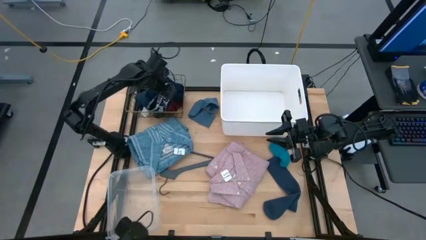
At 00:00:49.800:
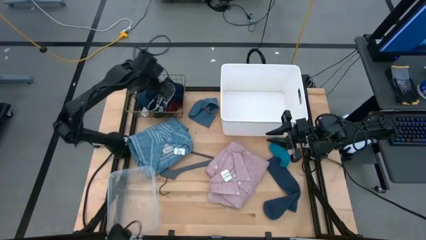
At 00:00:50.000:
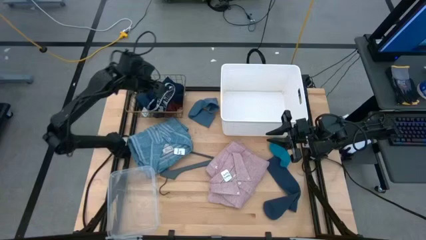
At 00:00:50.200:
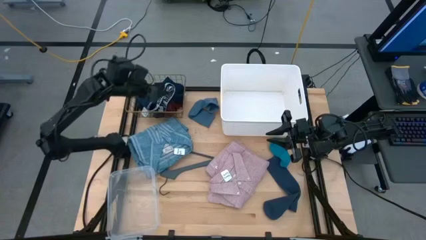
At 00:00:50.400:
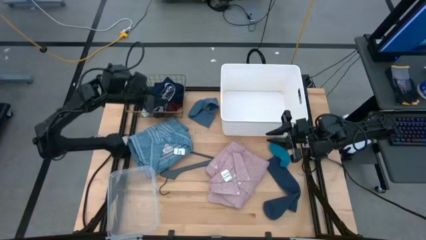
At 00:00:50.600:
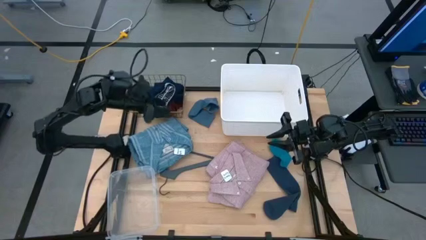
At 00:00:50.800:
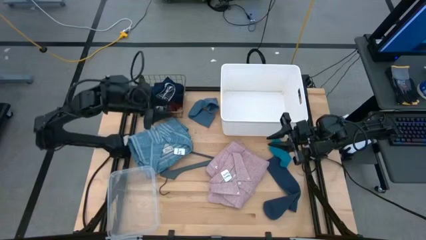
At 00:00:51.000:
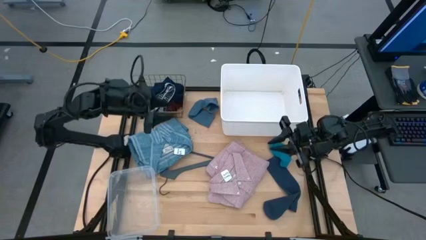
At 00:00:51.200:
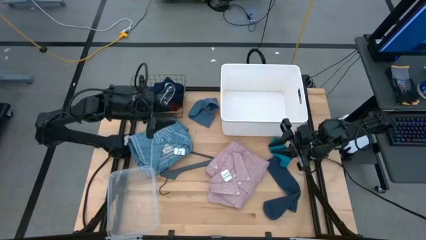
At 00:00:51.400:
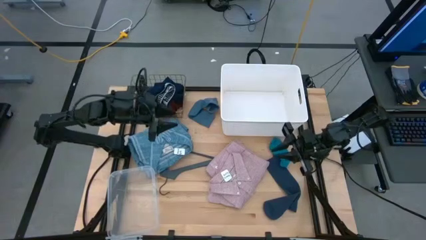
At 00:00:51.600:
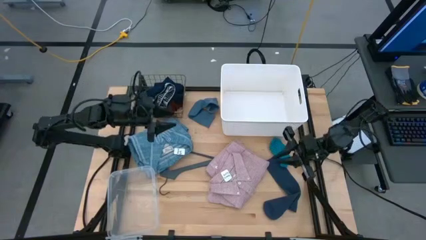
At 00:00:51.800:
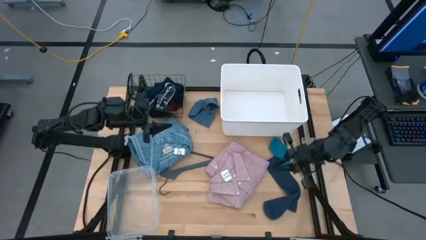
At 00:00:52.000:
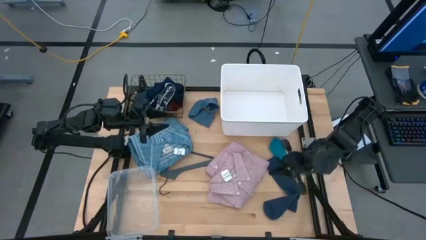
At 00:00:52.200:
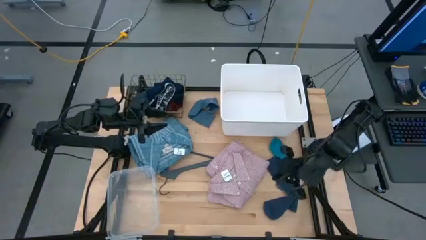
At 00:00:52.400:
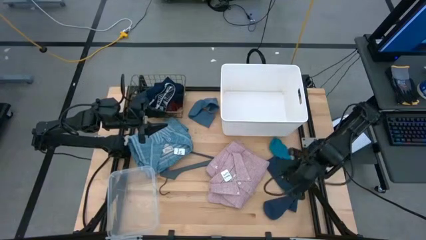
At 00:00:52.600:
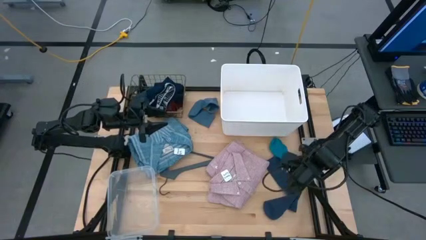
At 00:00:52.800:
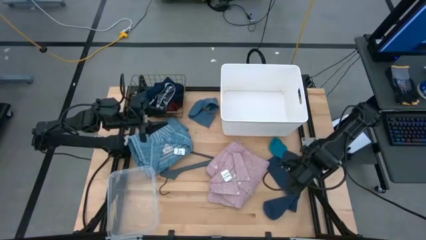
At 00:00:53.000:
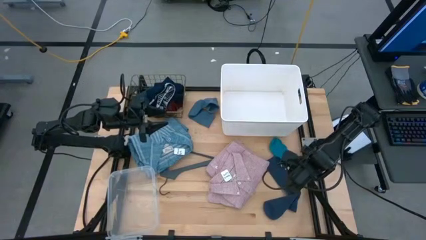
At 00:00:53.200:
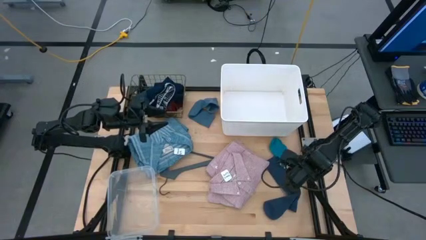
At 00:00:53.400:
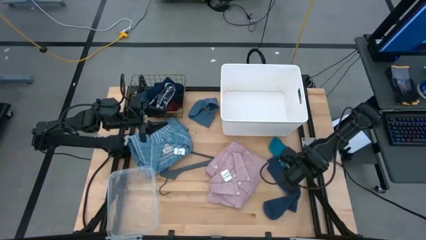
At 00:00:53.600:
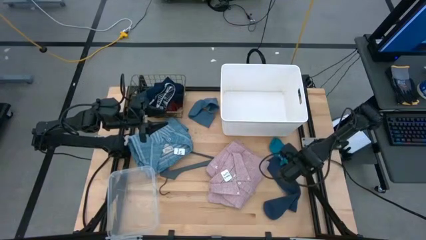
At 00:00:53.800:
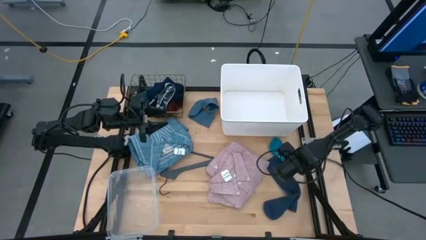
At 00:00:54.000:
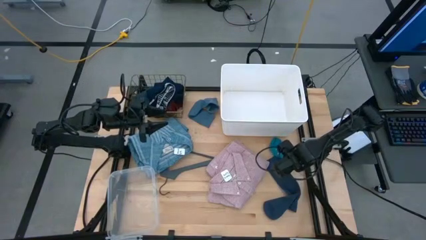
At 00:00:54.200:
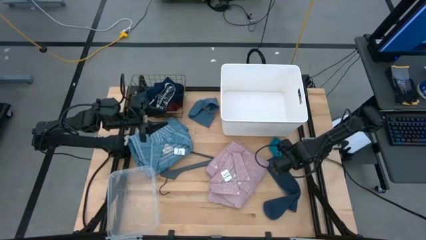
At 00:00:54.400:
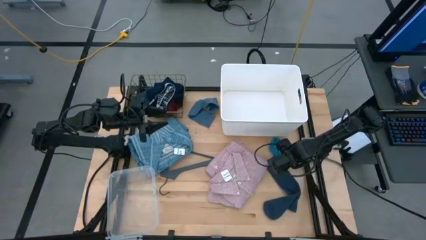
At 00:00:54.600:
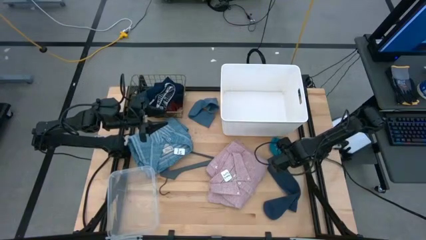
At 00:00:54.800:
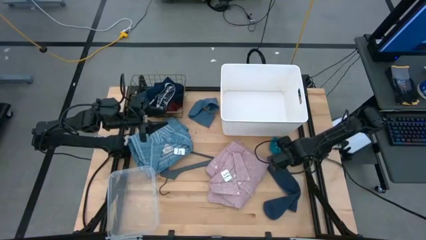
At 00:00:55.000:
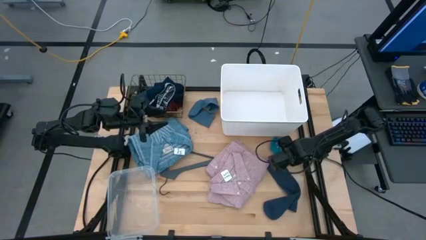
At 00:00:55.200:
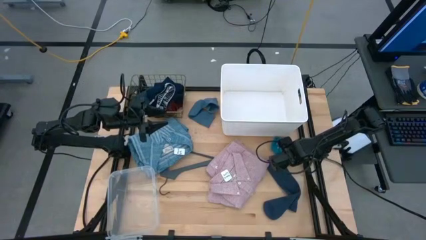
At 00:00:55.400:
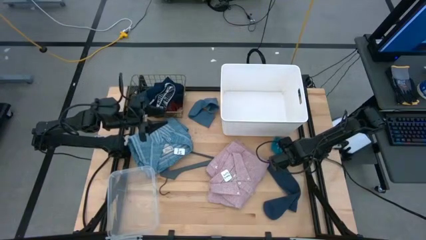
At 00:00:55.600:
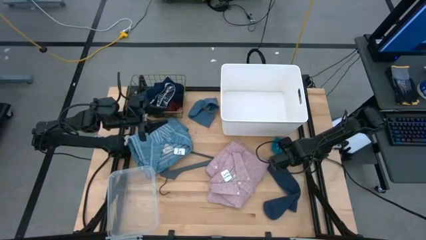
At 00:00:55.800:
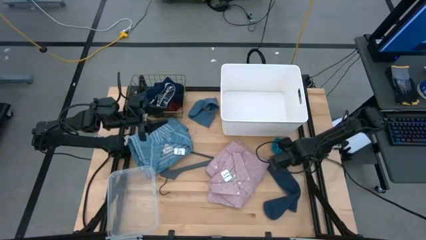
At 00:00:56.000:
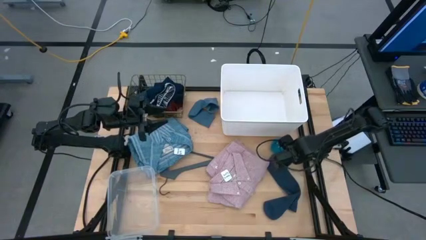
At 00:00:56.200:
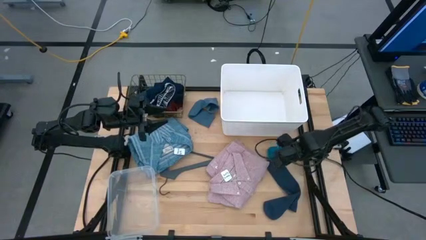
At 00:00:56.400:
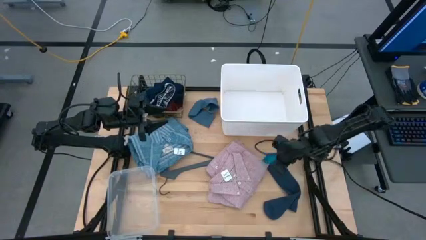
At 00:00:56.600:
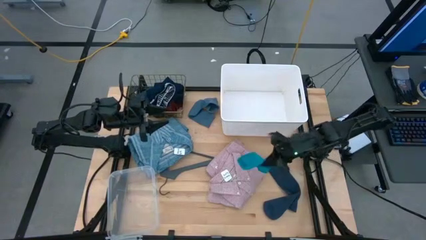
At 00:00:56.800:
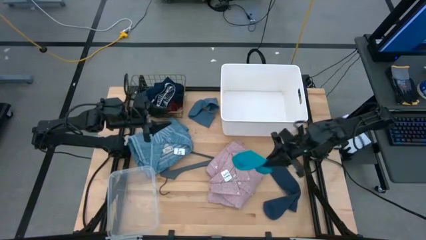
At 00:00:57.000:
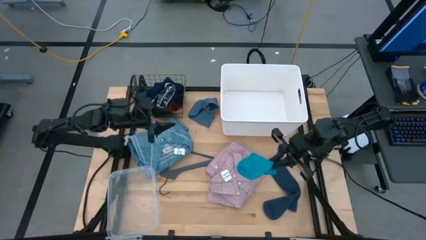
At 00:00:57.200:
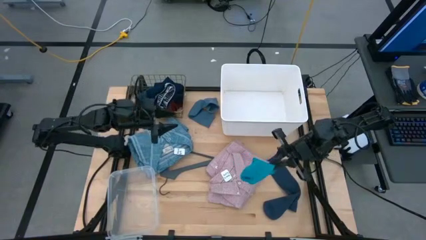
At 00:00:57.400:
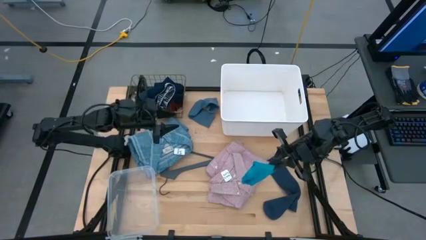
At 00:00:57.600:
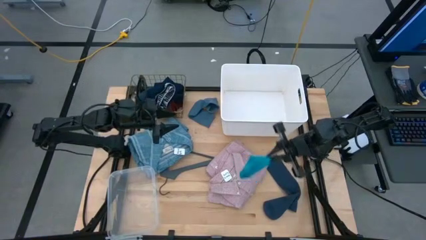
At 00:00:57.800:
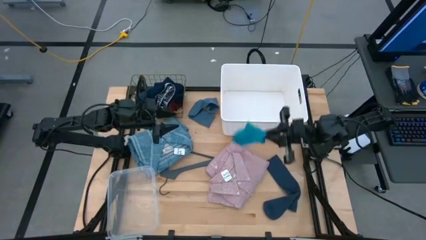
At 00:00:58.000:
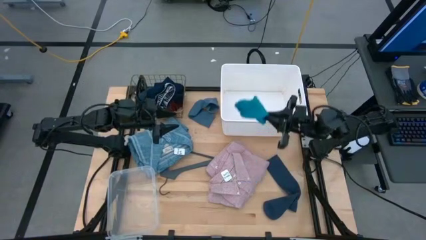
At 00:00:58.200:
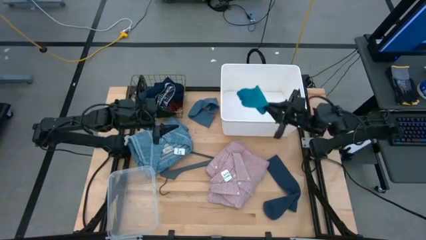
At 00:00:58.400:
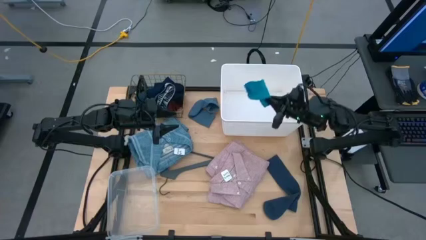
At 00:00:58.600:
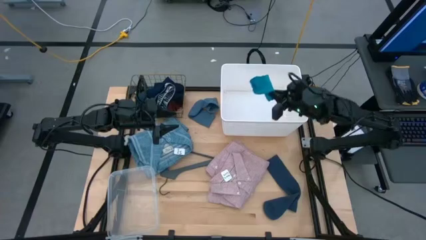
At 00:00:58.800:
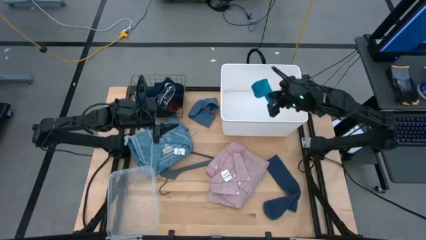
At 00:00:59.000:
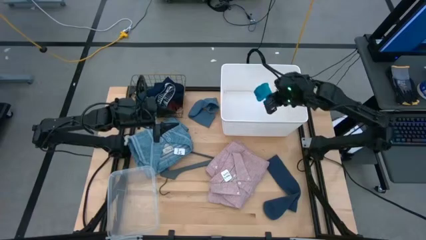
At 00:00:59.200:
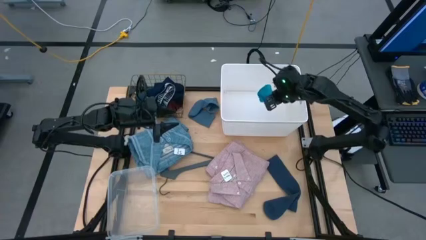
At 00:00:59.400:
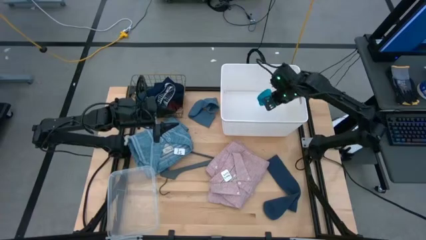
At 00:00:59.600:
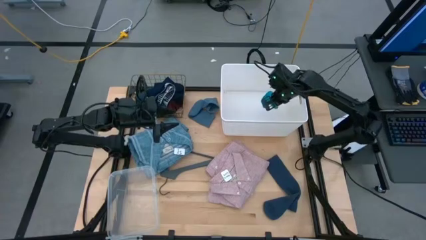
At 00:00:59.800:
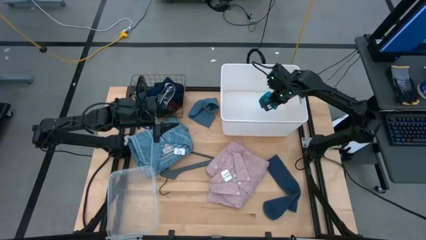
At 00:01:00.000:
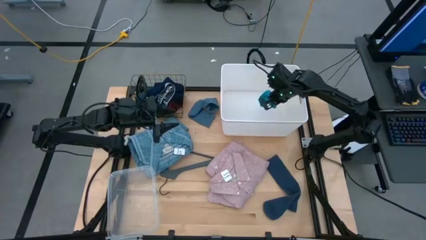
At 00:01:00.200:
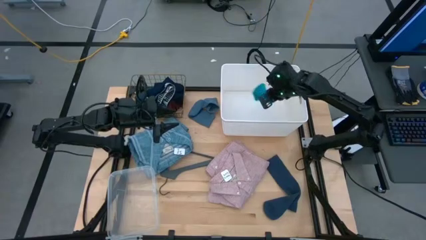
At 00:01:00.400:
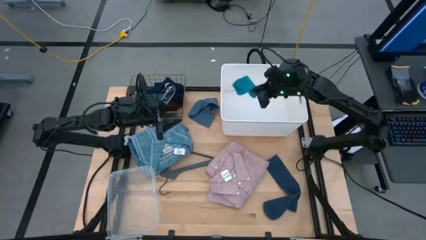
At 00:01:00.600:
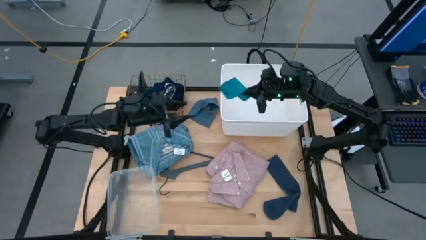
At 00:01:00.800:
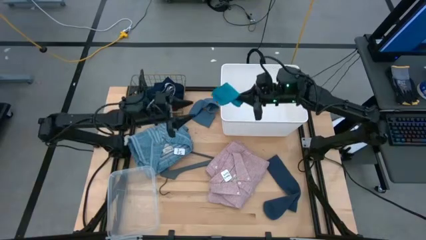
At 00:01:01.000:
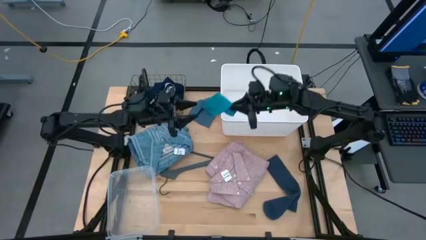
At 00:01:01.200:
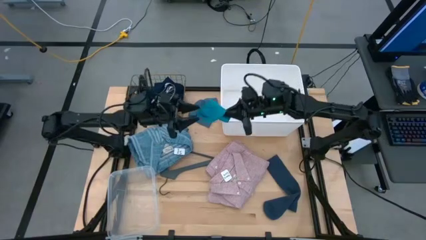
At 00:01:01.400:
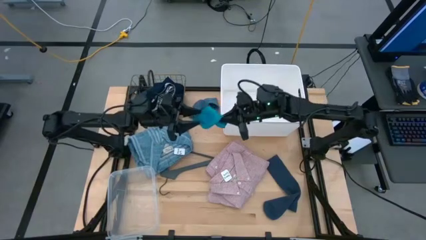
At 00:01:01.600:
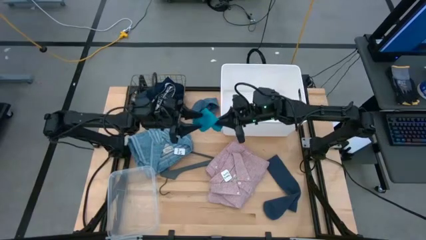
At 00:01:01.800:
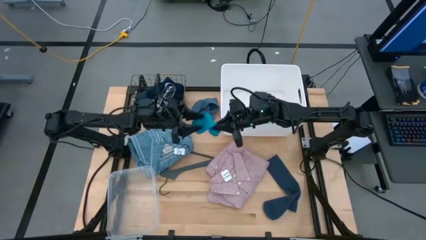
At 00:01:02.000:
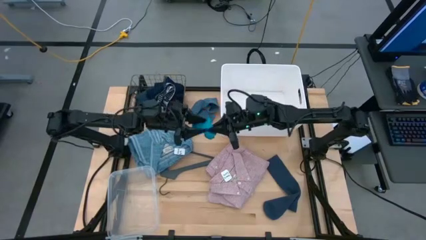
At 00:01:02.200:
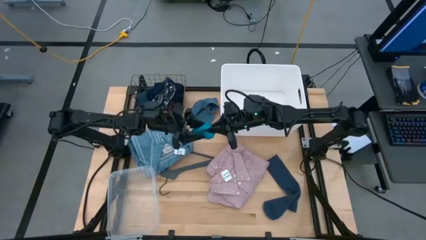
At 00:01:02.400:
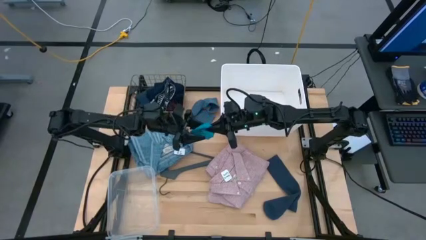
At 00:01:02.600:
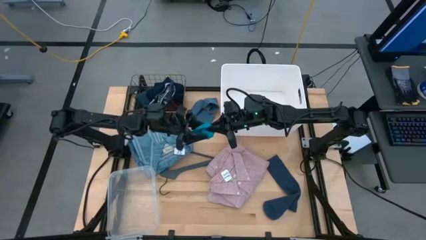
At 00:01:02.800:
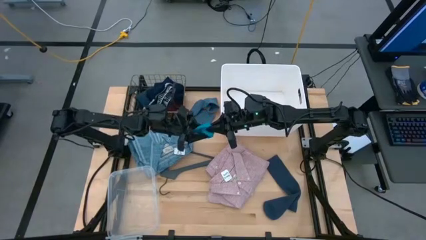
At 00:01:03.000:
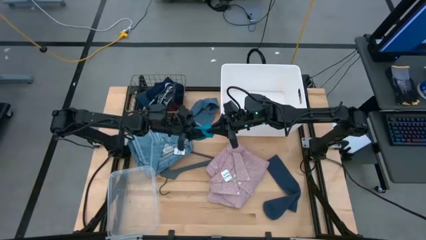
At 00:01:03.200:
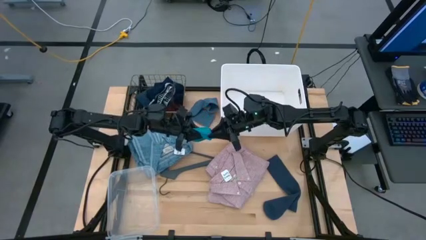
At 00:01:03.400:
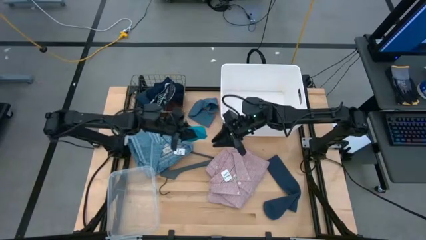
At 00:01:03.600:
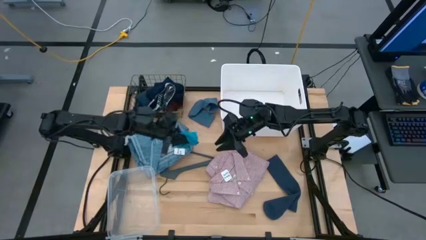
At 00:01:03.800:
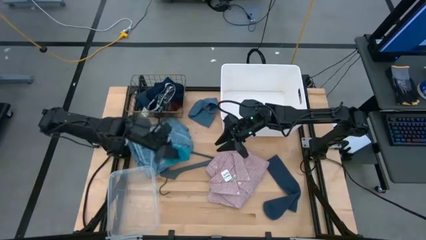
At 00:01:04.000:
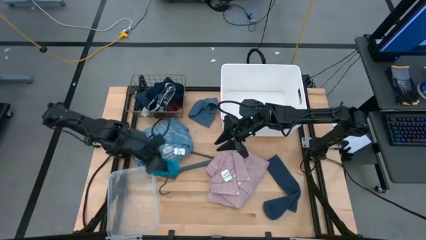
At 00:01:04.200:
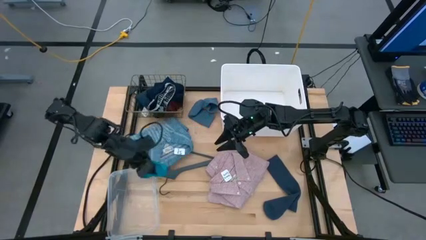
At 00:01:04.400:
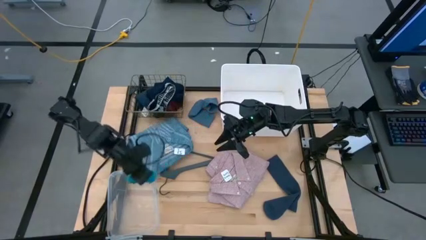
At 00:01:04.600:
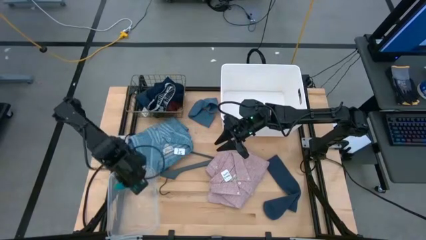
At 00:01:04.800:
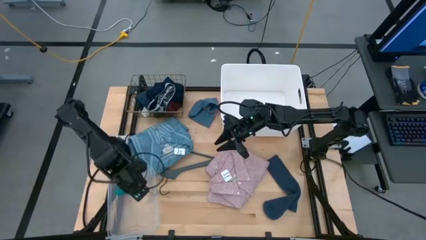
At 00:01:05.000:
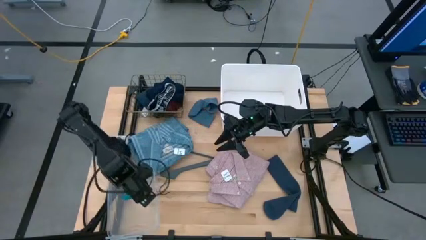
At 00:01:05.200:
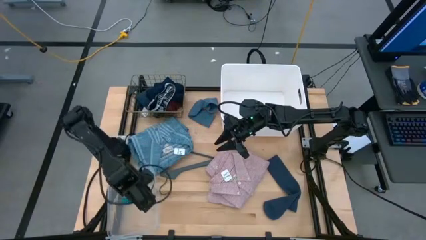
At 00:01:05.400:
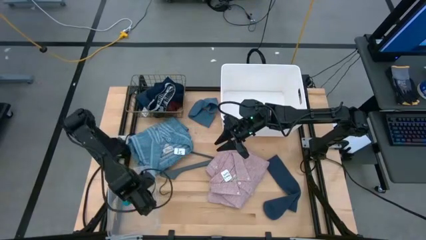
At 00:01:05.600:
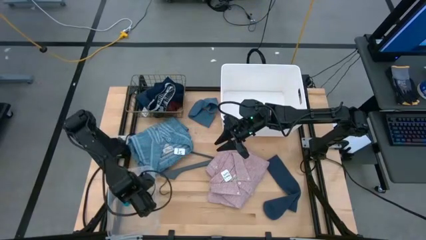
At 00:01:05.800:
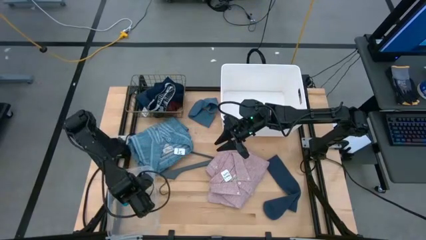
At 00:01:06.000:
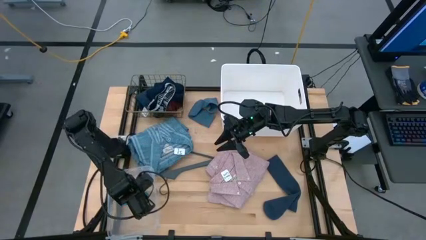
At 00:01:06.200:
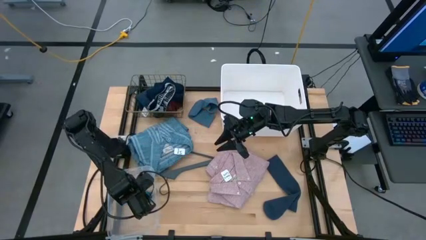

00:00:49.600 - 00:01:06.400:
Task: Pick & Place Cloths
Put the bottom light blue sock into the transparent bin
